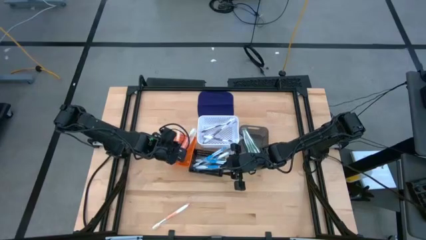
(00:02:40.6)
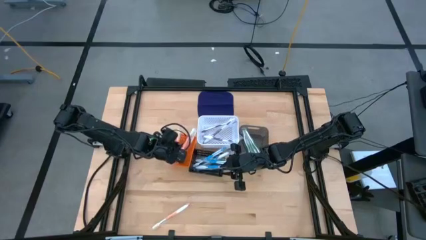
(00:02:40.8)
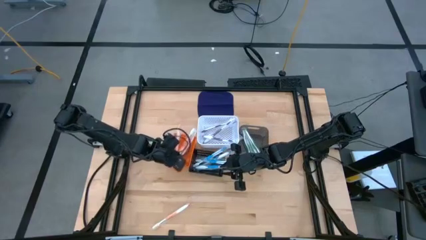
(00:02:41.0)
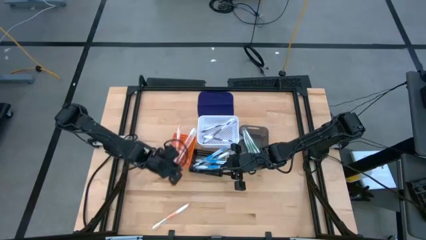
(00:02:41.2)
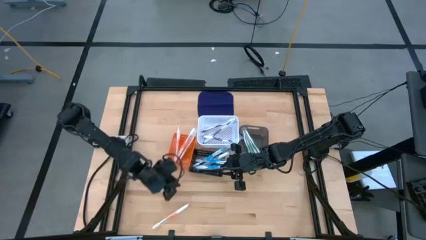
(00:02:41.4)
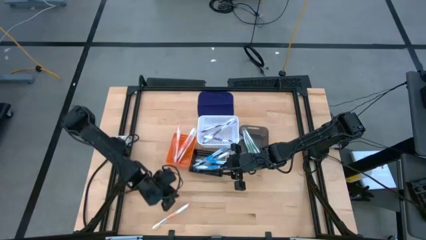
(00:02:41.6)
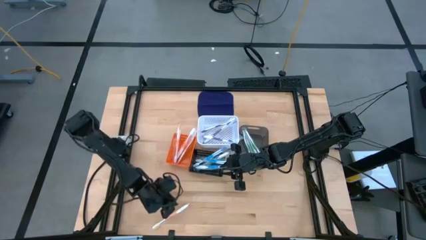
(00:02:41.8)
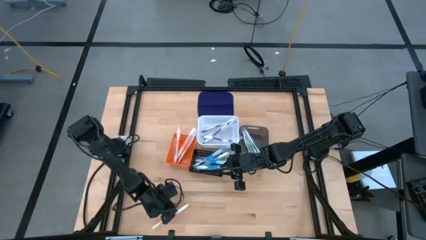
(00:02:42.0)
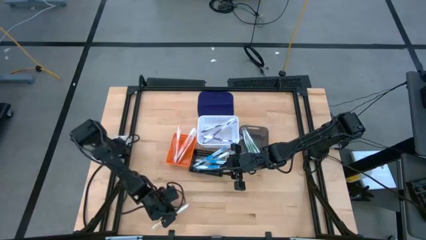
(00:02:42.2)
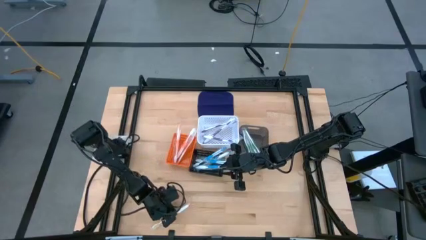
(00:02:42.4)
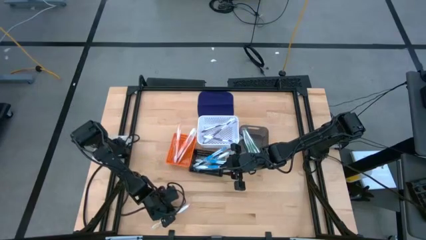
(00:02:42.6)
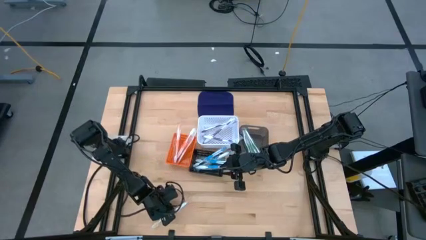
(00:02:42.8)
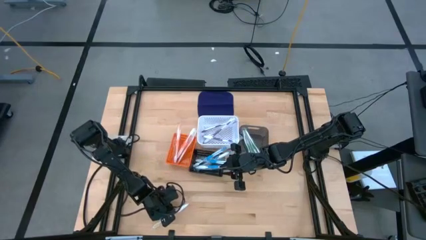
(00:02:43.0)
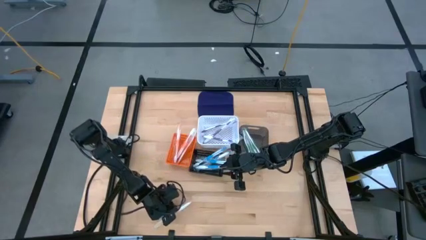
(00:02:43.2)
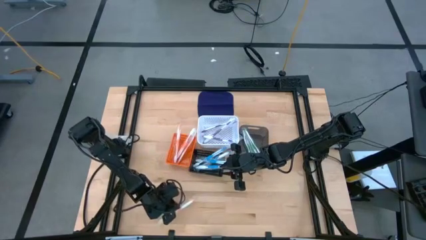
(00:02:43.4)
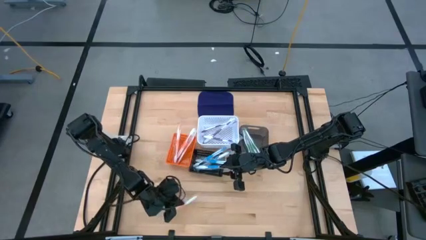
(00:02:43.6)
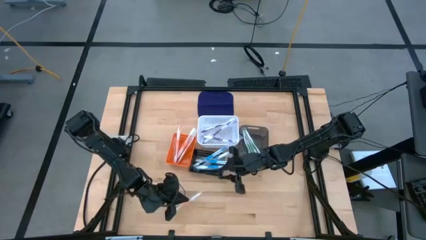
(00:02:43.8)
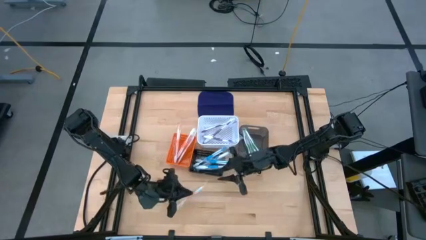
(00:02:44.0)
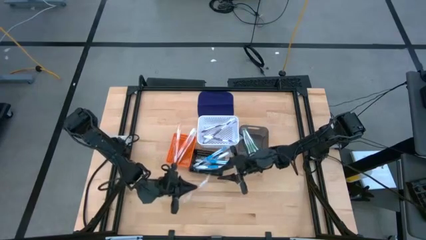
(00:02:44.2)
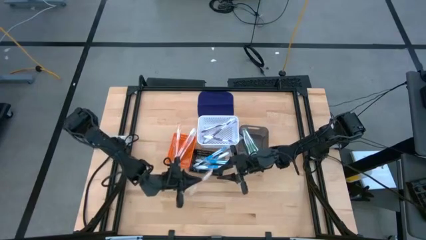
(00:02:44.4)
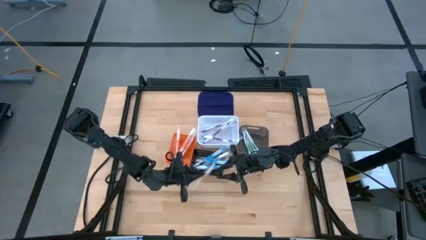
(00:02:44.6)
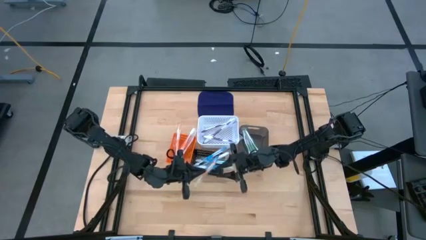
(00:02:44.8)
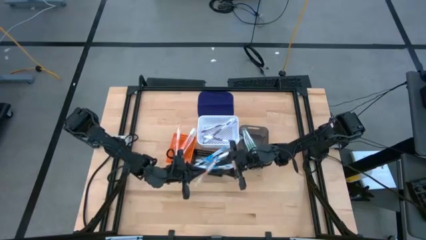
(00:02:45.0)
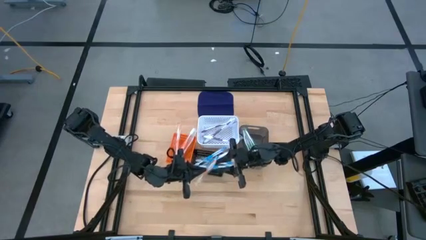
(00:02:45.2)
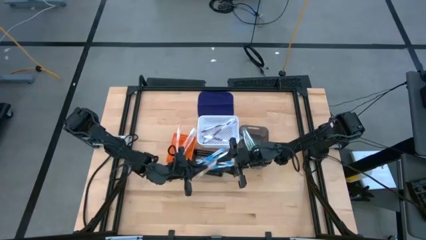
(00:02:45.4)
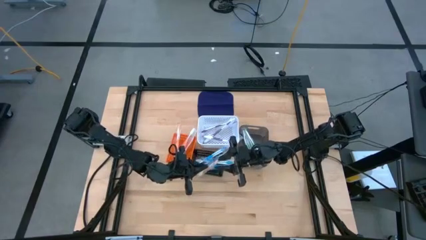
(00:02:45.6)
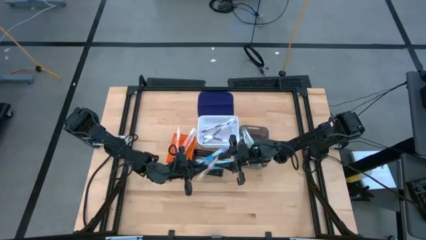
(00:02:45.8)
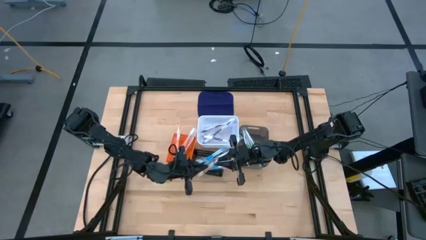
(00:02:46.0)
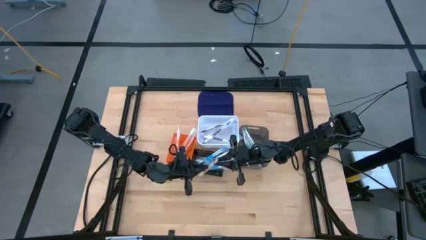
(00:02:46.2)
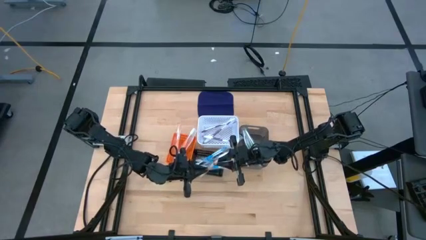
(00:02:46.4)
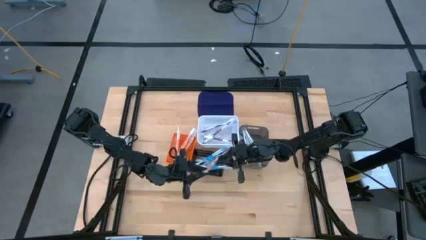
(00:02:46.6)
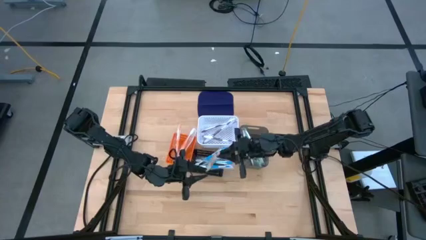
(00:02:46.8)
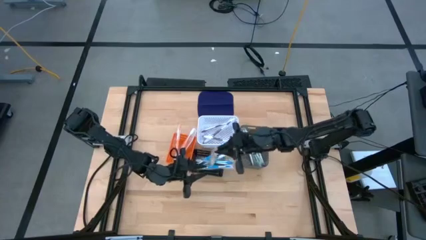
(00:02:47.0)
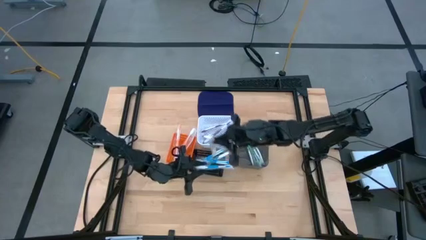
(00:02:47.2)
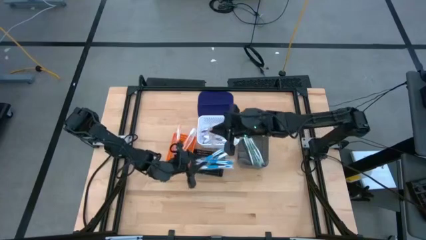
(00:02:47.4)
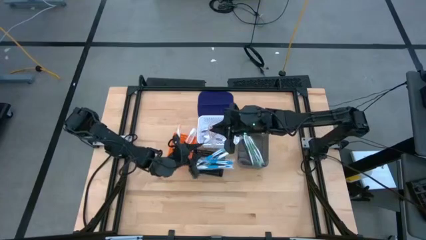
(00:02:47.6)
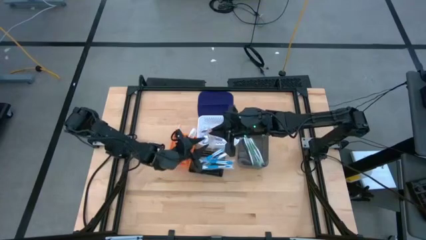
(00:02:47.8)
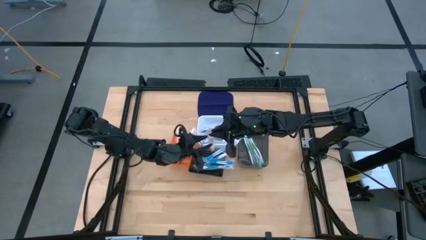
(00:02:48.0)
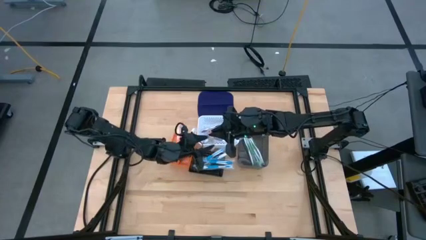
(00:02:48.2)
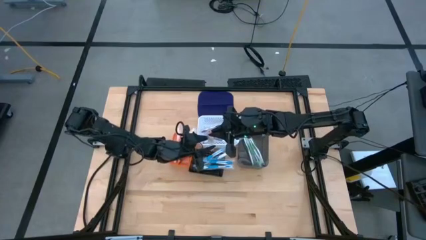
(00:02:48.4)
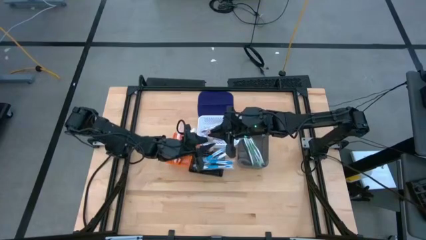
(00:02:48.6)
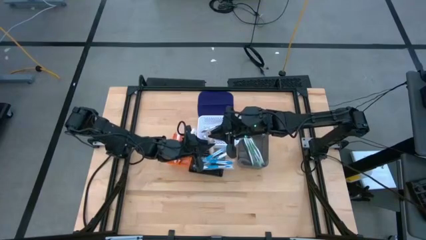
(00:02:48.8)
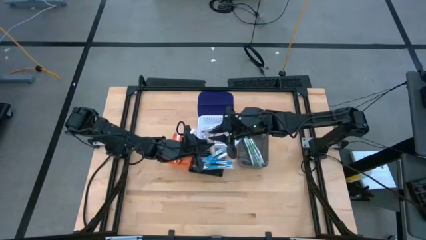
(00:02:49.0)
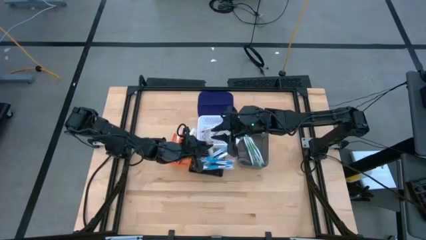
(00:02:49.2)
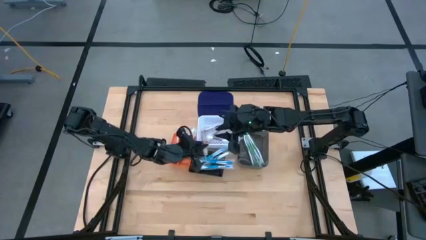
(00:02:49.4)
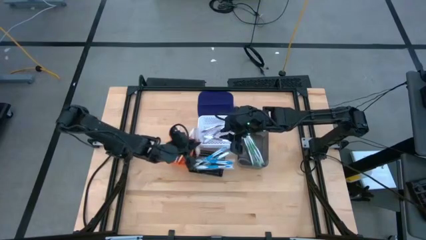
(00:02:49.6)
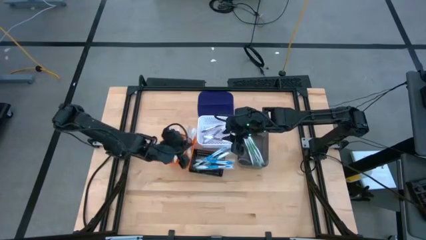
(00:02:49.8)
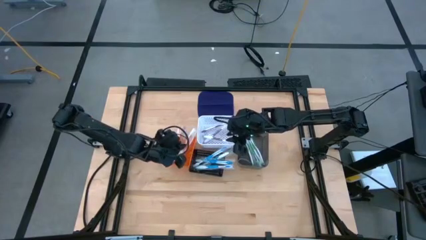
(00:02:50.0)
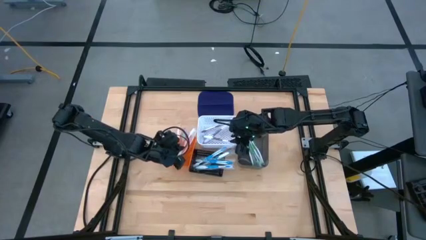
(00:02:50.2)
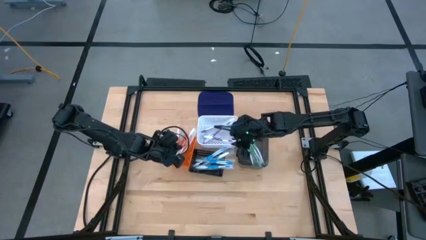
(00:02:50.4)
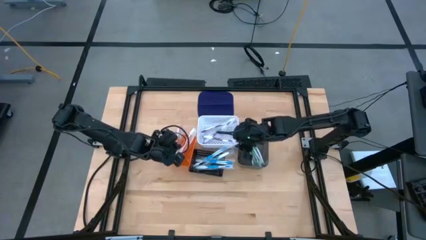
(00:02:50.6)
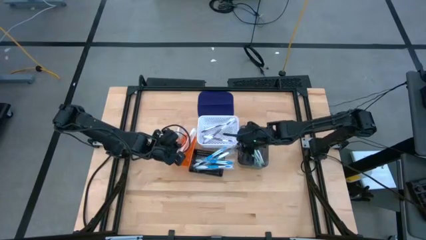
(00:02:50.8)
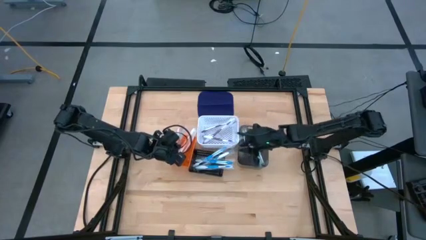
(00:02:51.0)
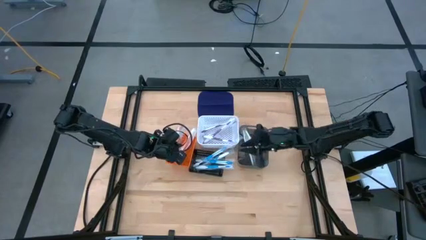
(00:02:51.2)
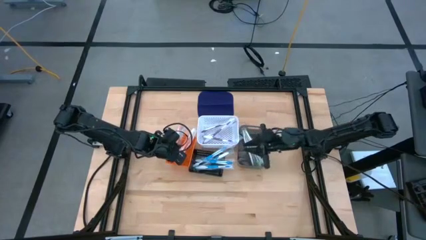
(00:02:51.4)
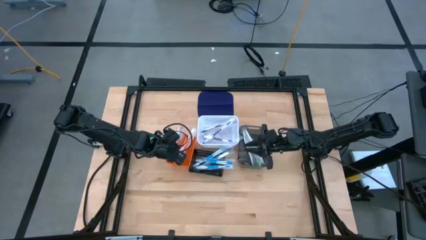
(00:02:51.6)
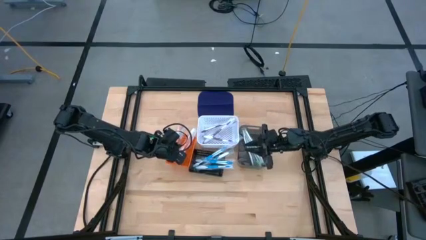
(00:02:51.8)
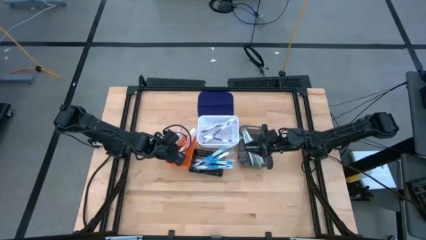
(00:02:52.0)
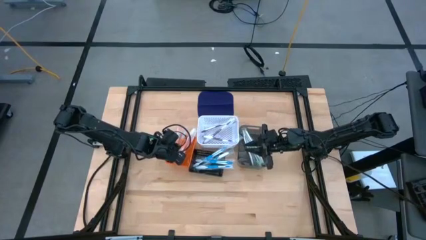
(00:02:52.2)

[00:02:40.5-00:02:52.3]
Task: Pick & Place Toothbrushes
Put the orange toothbrush into the orange basket

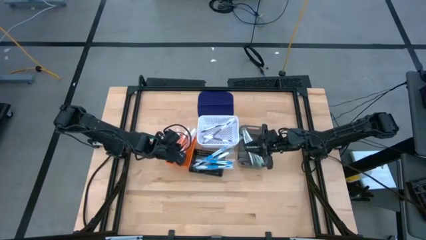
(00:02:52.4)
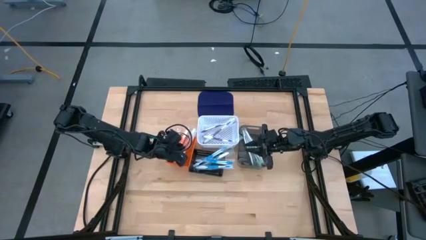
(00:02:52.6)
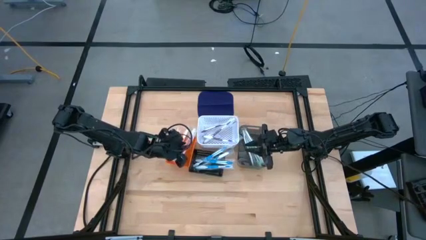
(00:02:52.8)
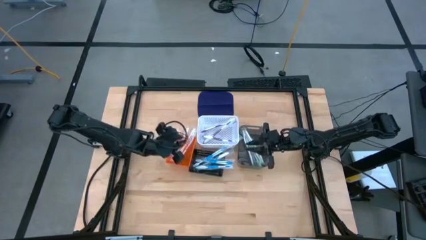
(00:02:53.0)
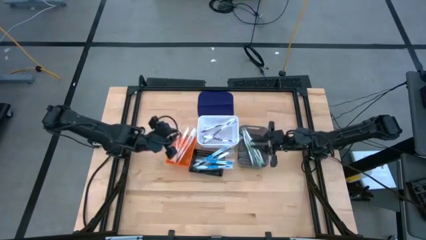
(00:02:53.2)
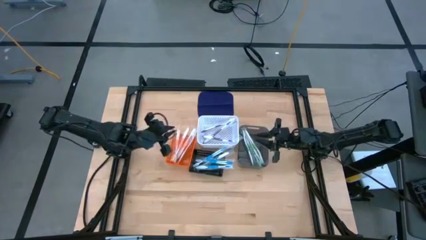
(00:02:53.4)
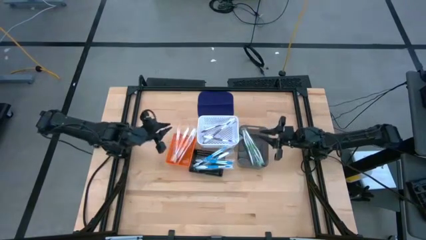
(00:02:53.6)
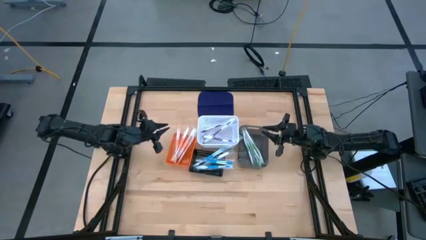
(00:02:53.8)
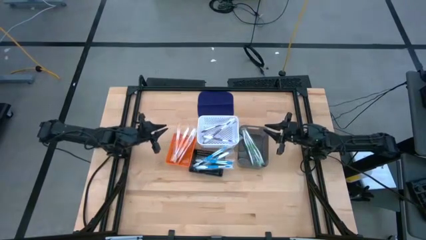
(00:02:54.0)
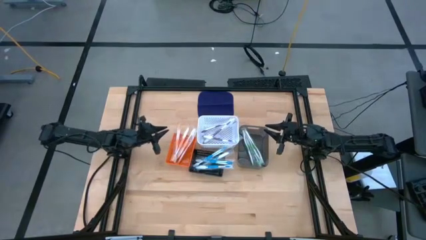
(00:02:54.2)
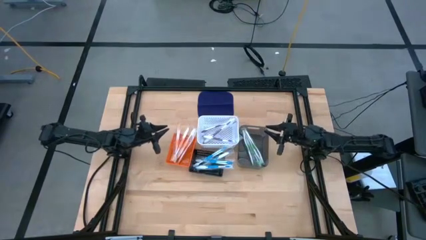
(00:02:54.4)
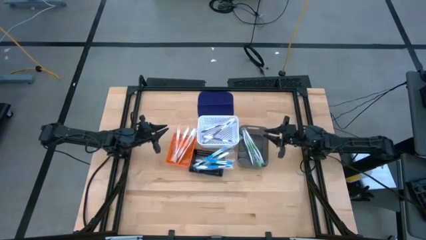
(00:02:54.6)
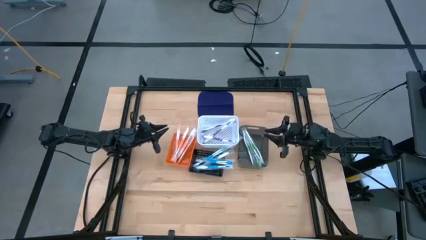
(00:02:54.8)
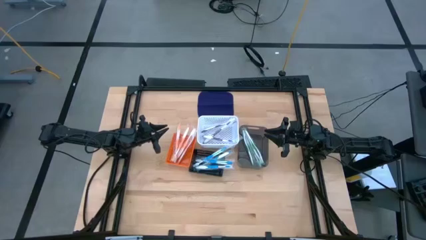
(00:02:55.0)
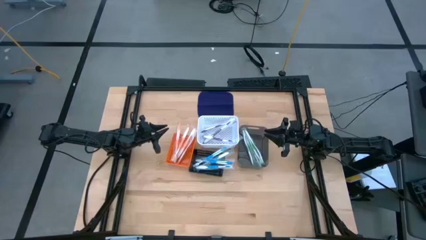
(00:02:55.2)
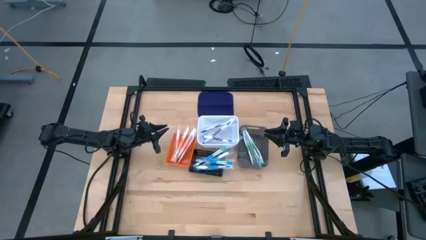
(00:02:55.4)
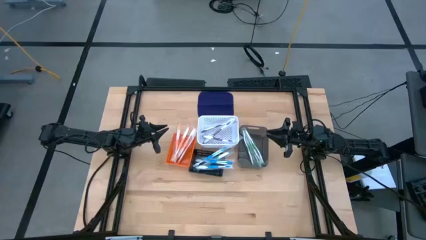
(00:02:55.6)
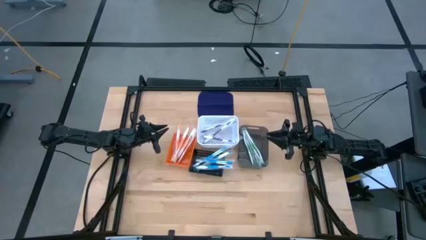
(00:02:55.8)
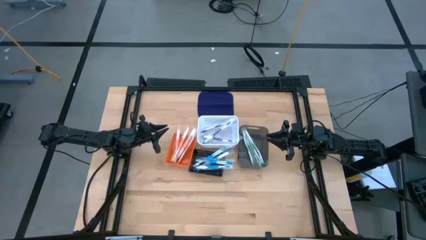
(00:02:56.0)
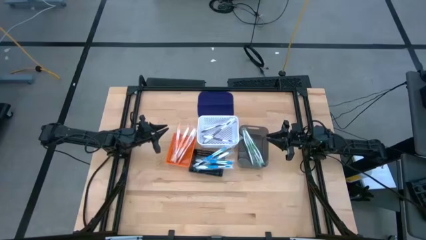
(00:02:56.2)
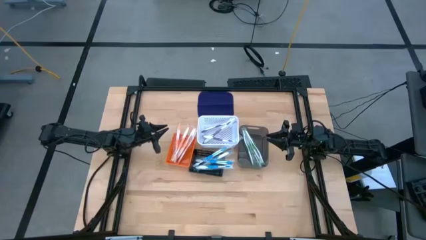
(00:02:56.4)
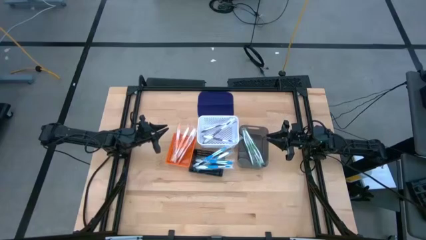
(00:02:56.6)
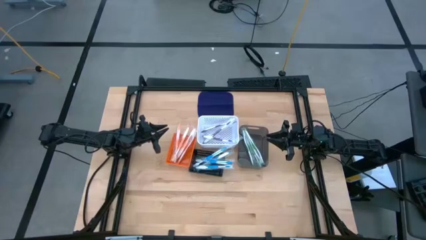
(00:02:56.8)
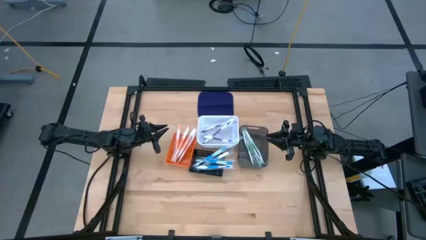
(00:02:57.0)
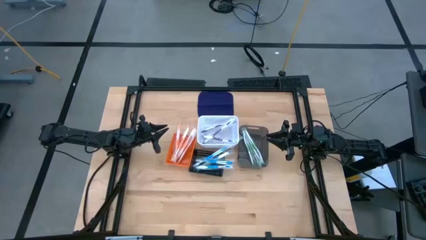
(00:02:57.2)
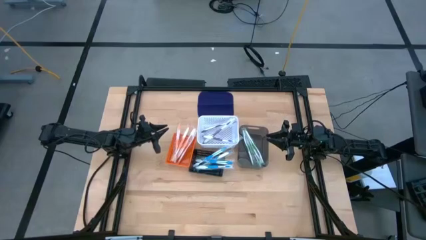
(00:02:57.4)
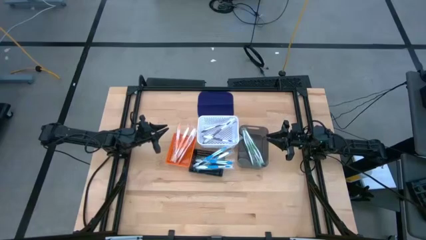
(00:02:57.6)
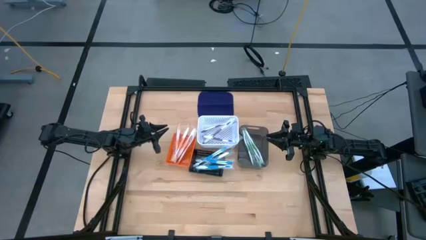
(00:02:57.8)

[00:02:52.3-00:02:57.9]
Return to Home Position
